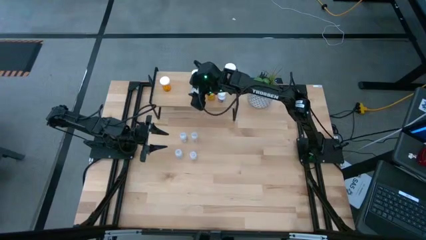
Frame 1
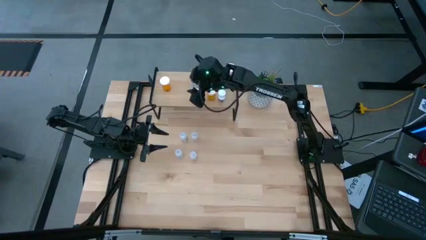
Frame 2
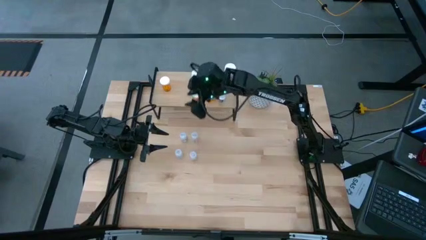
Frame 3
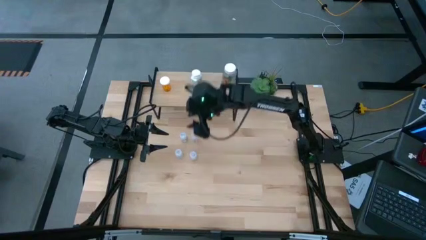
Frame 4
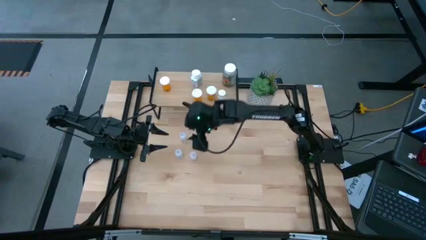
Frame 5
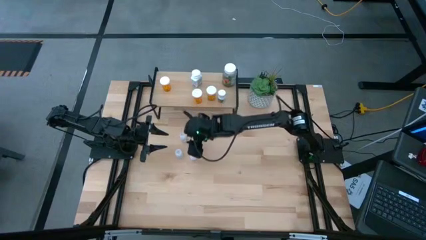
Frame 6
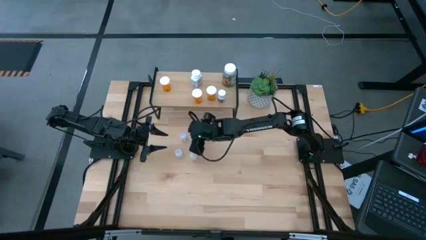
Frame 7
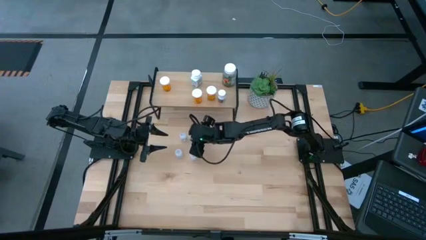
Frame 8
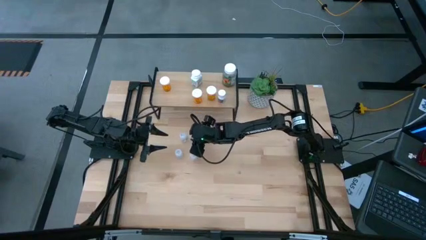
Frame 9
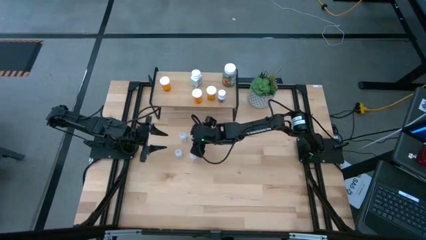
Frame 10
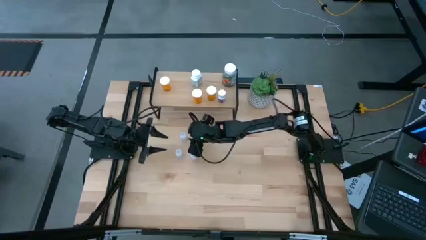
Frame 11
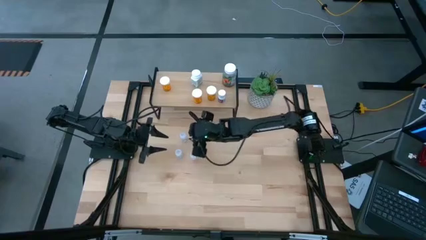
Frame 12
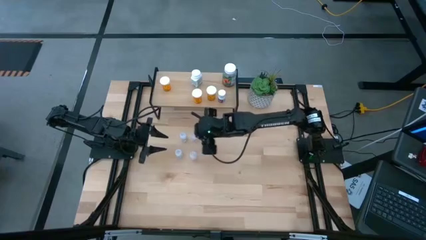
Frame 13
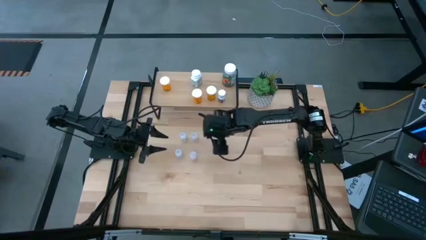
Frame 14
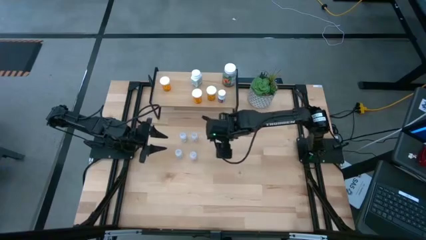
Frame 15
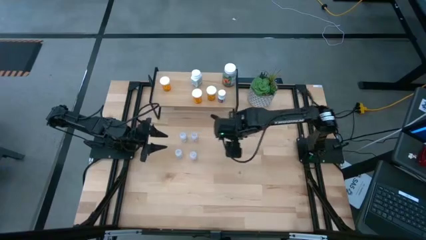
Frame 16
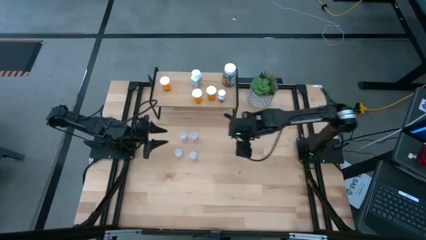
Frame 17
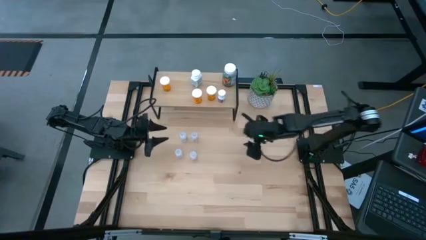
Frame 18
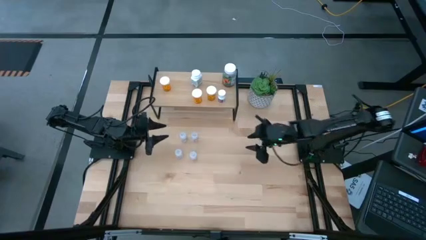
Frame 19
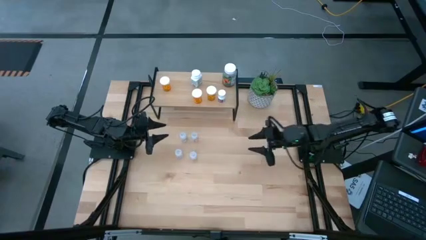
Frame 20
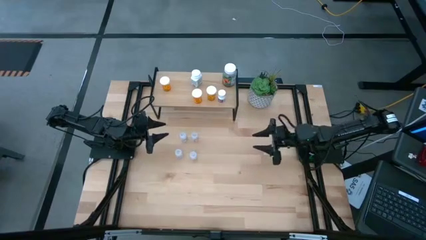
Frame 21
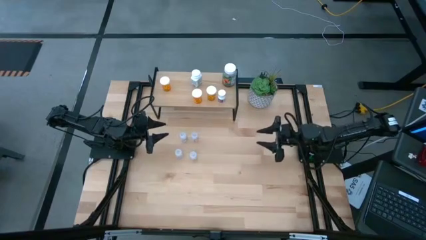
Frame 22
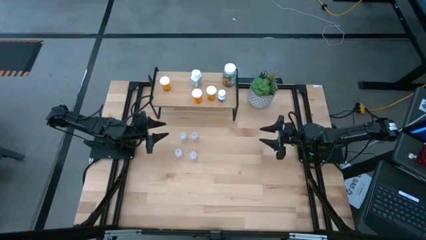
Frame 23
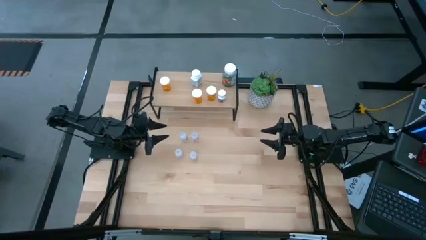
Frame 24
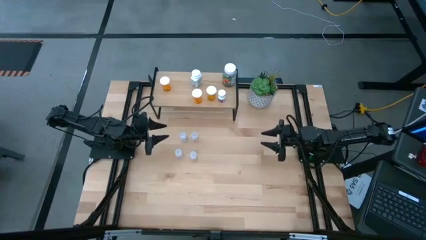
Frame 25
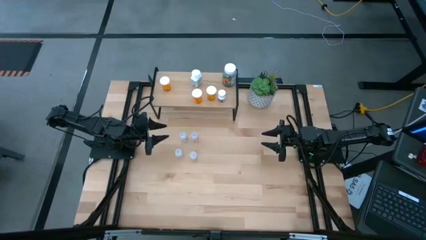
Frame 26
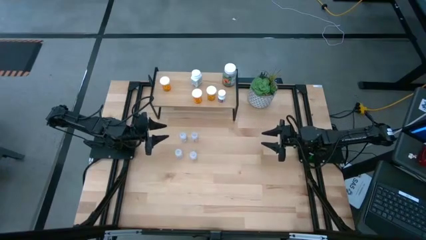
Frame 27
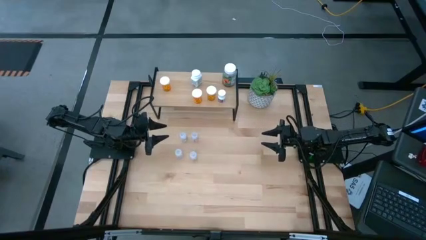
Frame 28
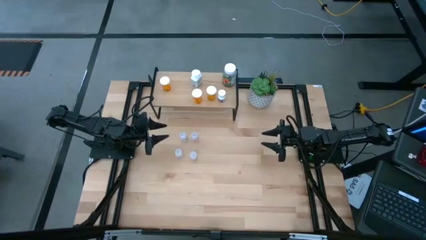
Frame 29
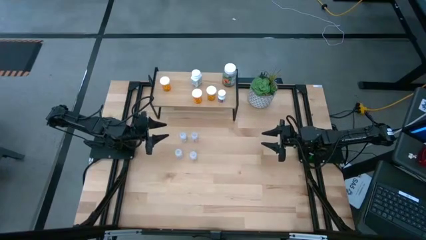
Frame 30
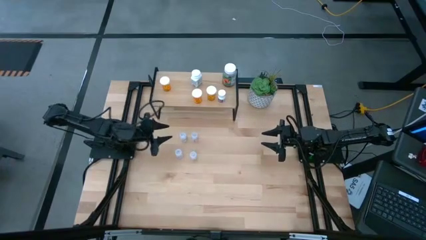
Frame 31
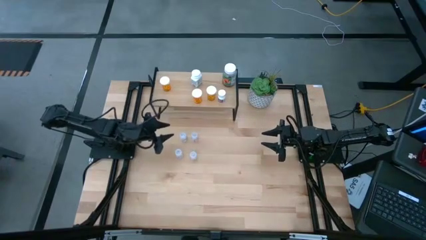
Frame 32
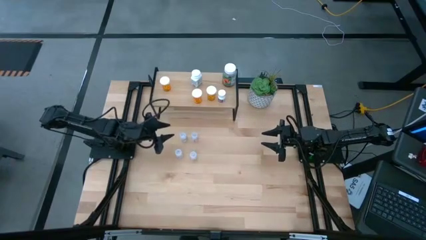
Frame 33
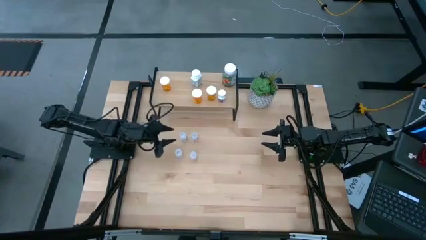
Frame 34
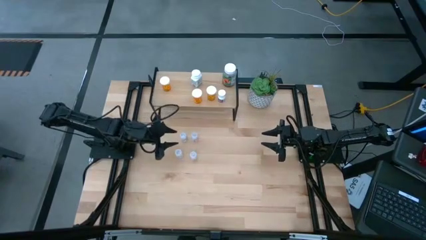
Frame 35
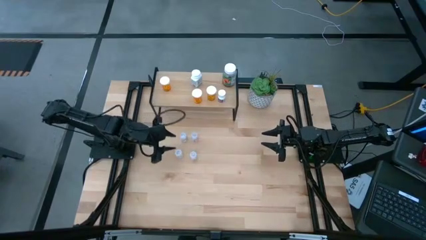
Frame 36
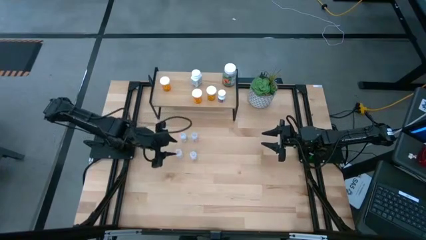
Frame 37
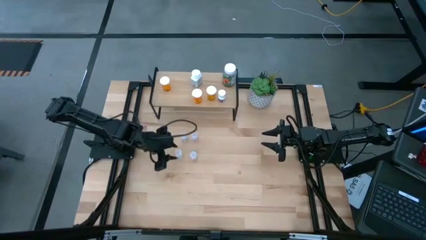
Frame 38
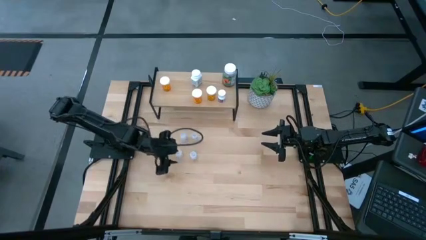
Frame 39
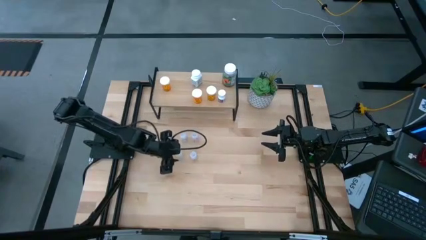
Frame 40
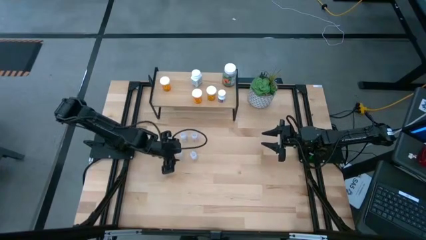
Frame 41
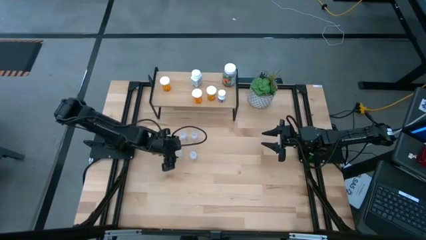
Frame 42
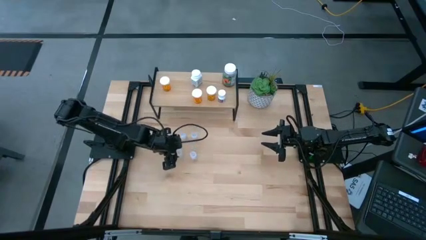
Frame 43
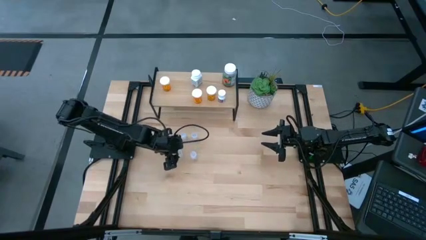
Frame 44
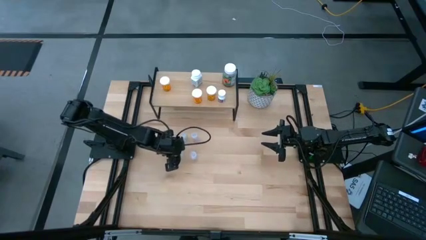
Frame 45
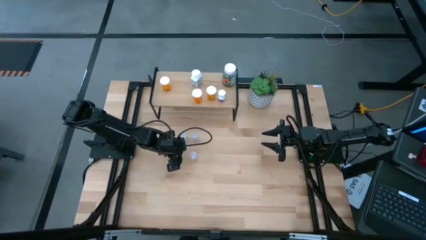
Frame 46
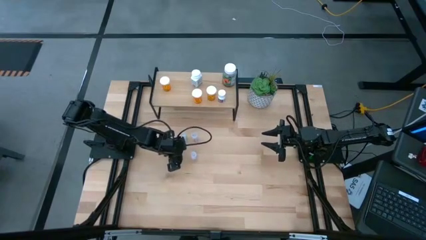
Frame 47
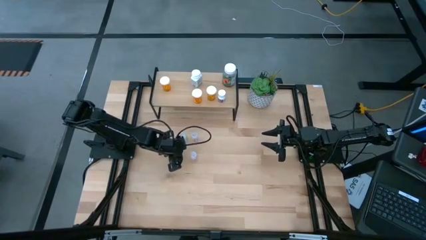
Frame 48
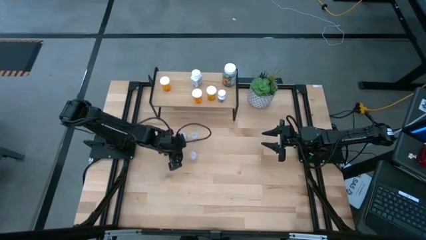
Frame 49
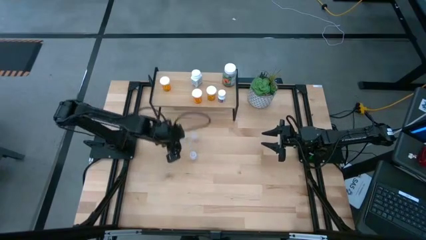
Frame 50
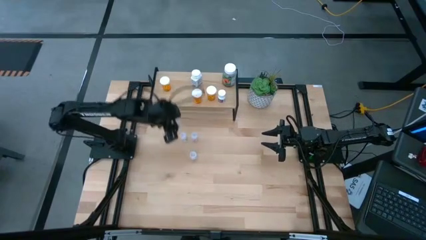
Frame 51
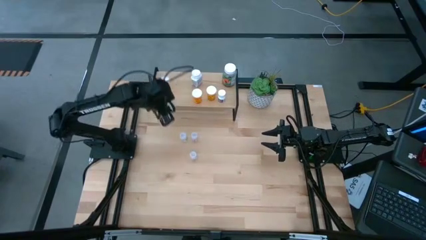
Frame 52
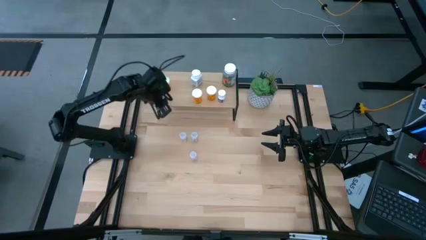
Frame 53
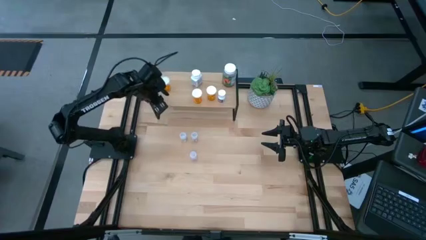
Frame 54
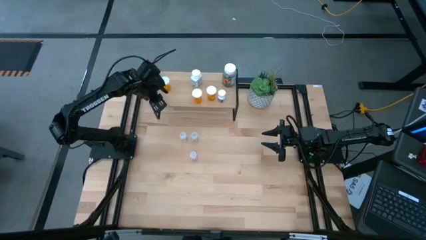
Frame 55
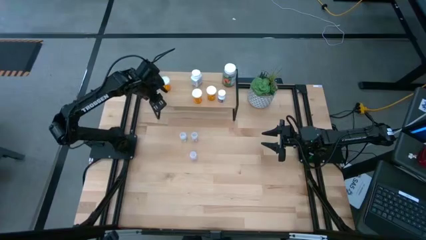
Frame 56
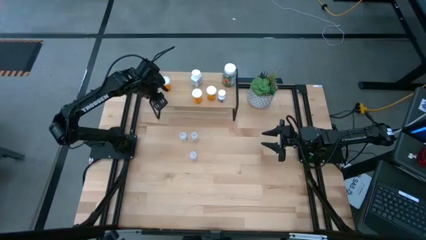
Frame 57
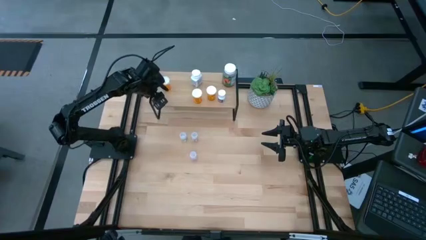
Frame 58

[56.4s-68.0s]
Task: Pick and place medicine bottles onto shelf by color
Put the transparent pill bottle on the shelf

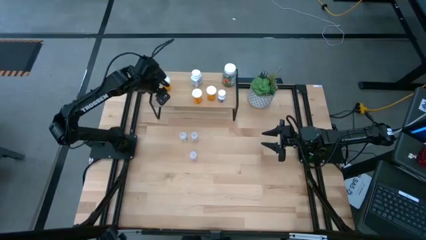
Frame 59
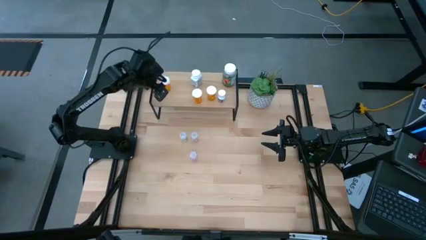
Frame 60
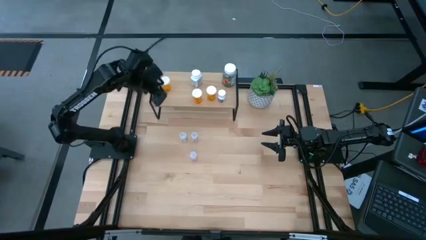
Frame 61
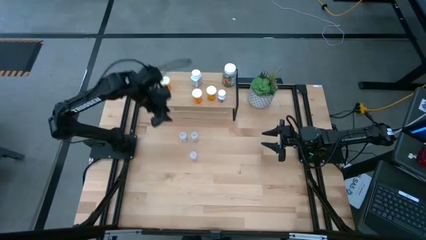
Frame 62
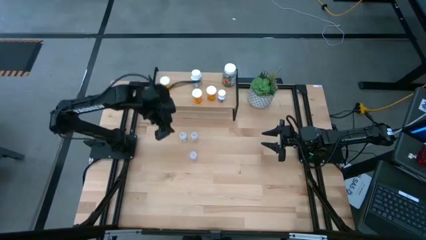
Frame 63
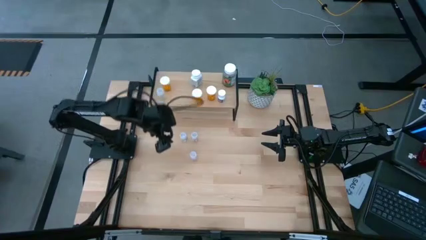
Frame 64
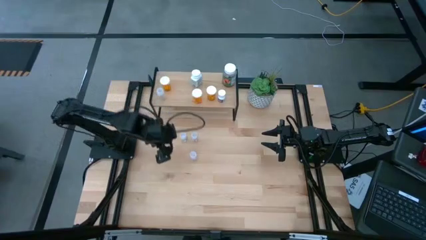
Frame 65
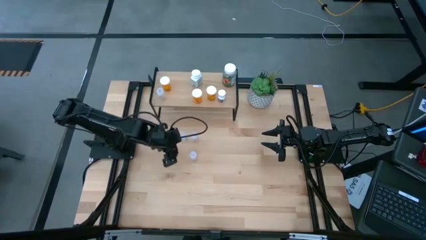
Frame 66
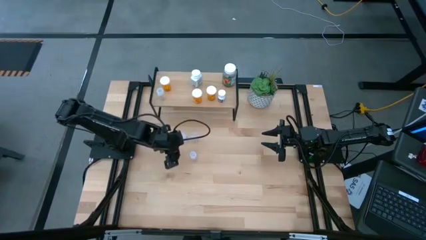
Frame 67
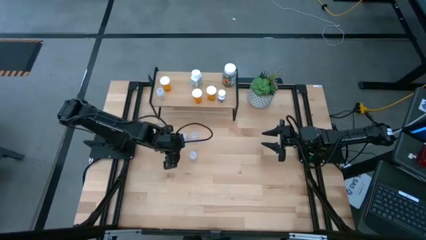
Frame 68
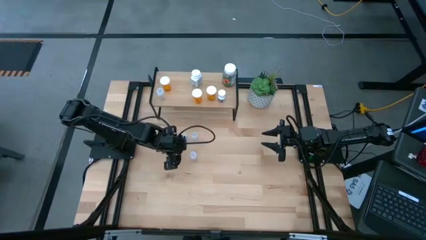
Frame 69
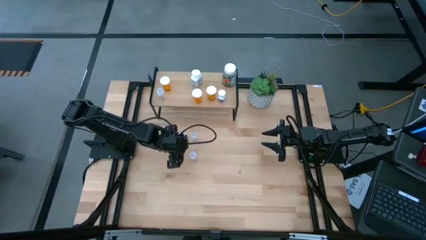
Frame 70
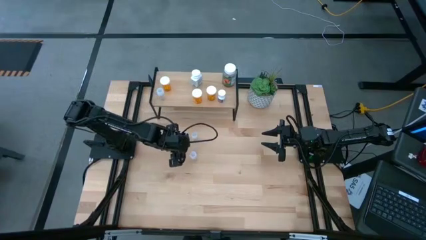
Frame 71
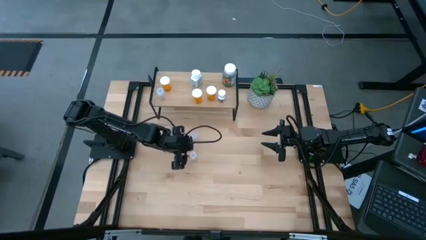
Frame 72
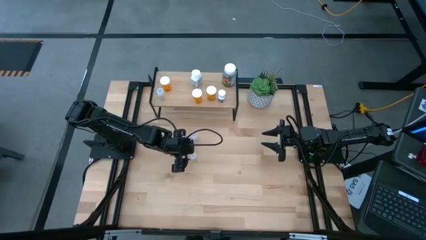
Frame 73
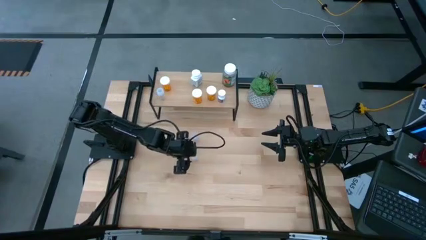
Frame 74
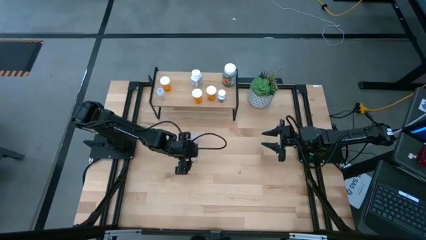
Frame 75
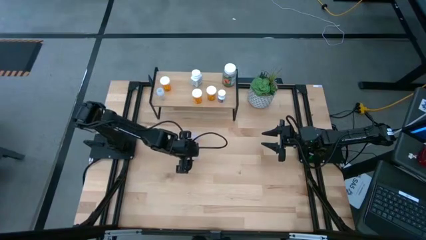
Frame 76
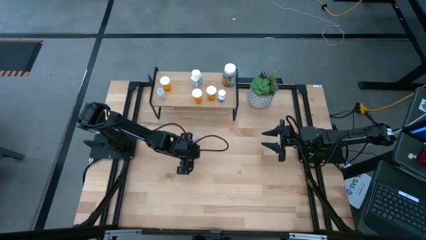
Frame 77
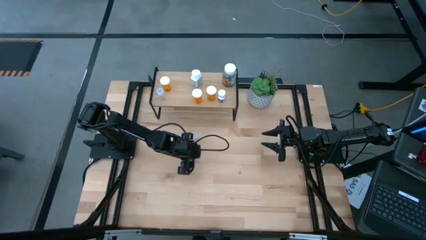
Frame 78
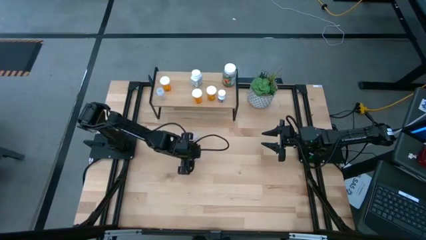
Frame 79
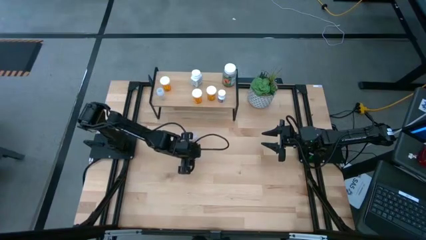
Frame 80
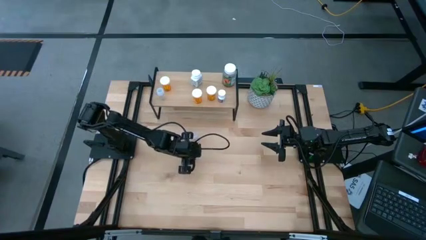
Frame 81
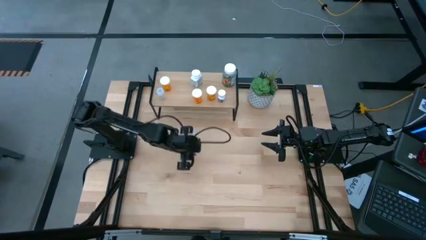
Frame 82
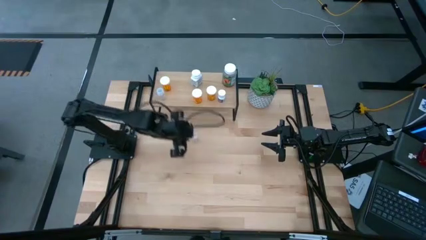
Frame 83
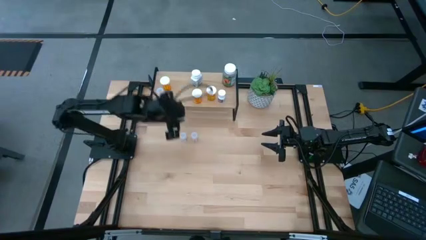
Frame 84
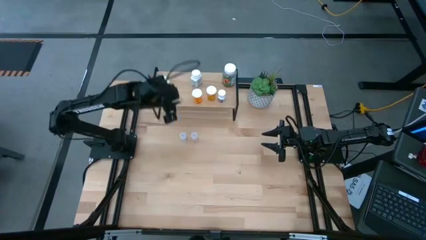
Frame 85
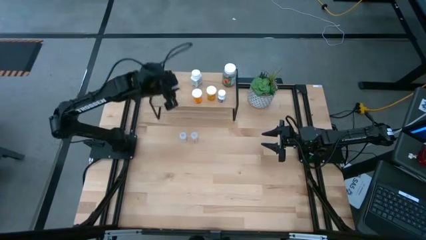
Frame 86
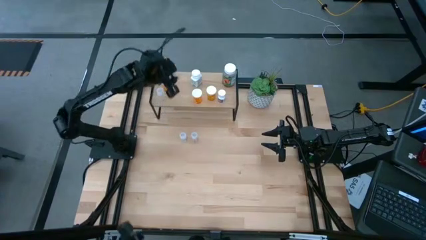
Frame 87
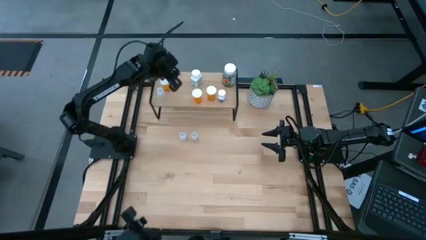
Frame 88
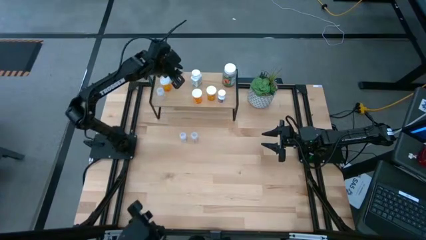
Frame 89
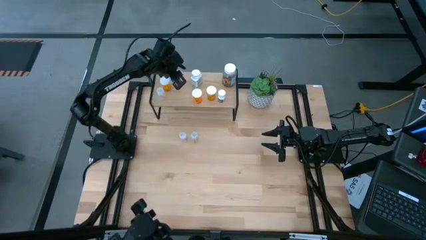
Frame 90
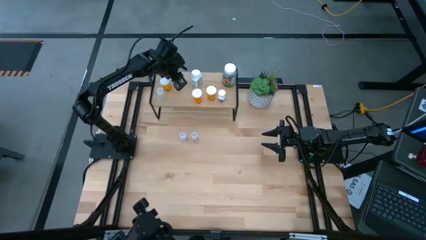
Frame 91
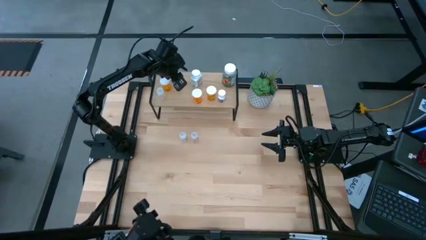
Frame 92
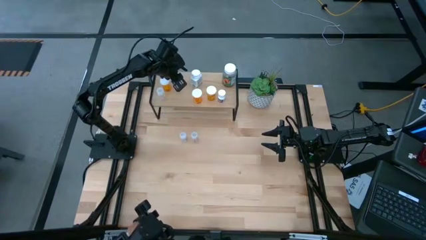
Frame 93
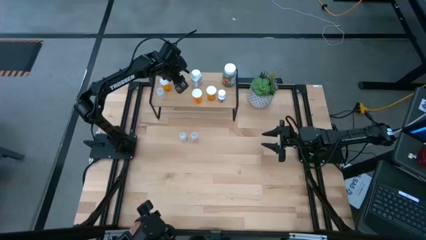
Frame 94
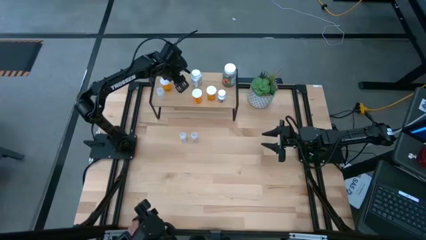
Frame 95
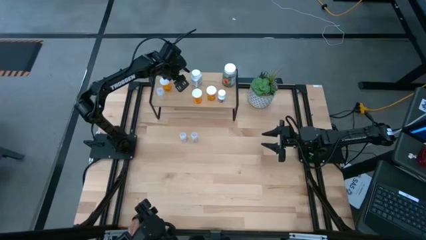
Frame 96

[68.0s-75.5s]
Put the transparent pill bottle on the shelf
